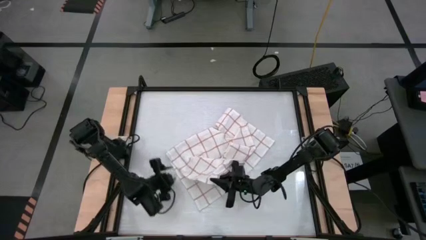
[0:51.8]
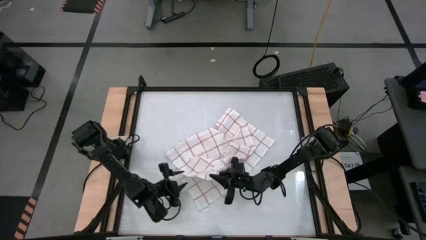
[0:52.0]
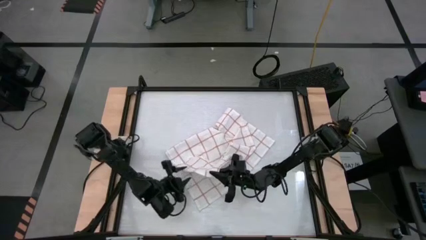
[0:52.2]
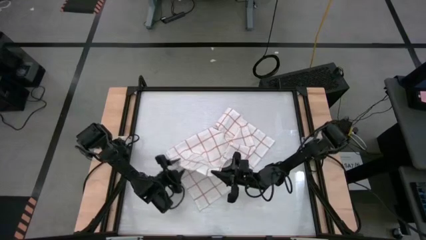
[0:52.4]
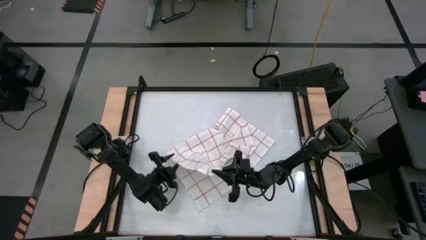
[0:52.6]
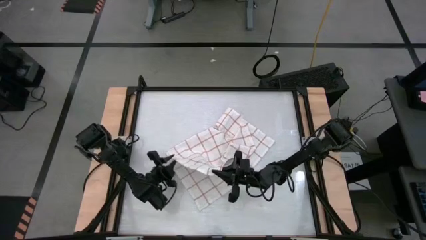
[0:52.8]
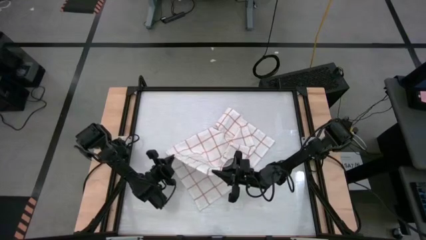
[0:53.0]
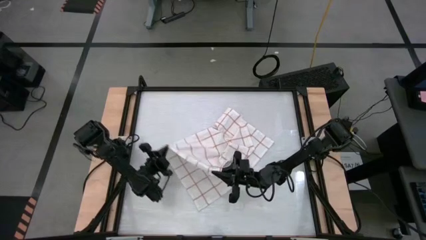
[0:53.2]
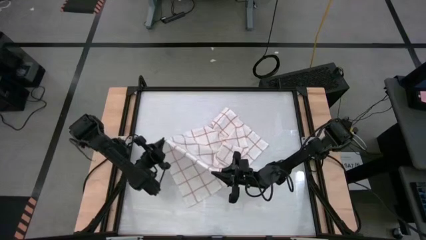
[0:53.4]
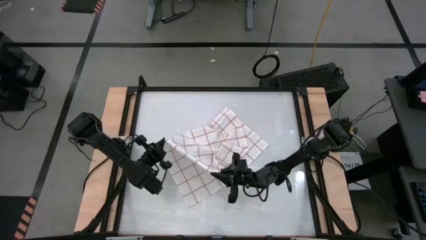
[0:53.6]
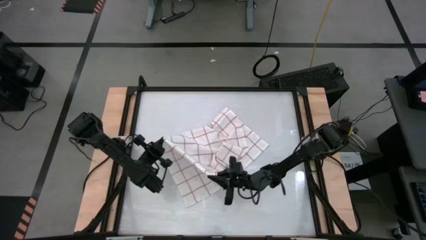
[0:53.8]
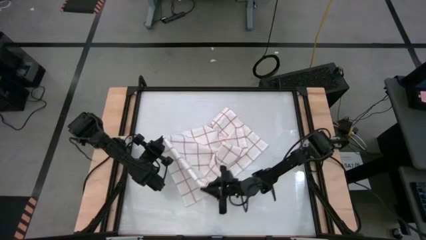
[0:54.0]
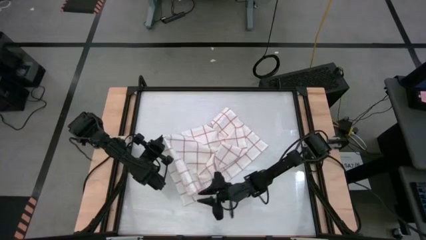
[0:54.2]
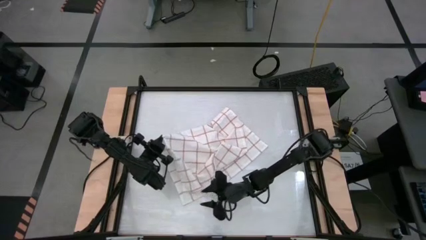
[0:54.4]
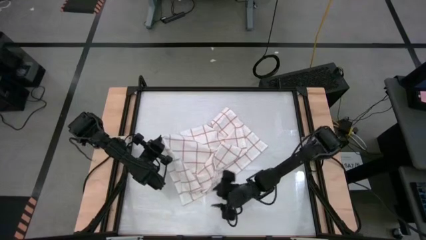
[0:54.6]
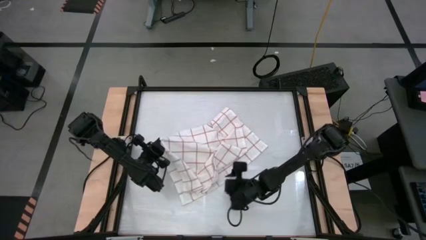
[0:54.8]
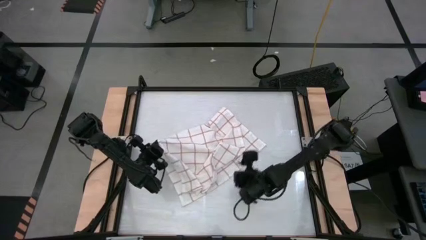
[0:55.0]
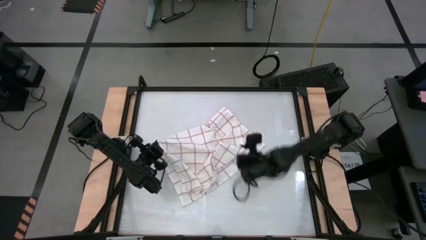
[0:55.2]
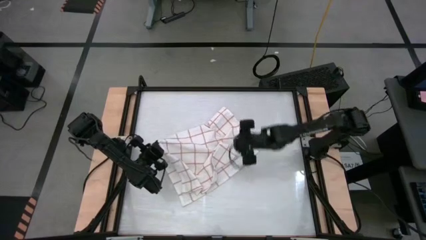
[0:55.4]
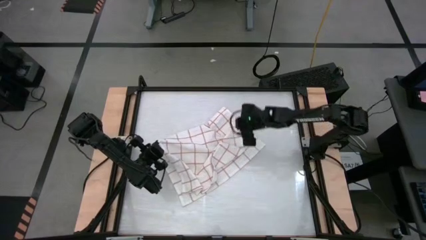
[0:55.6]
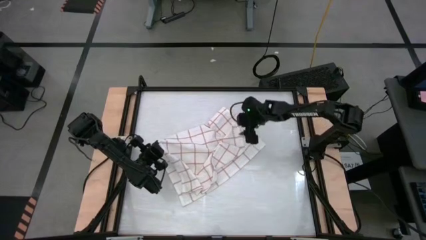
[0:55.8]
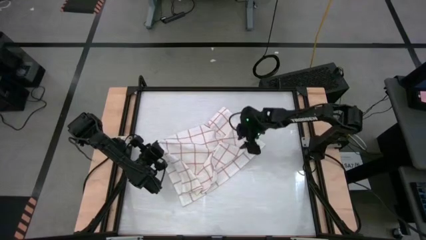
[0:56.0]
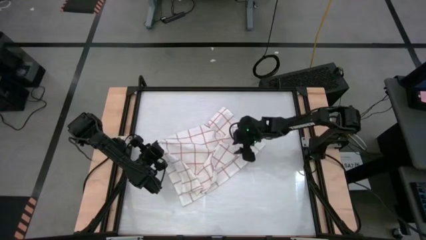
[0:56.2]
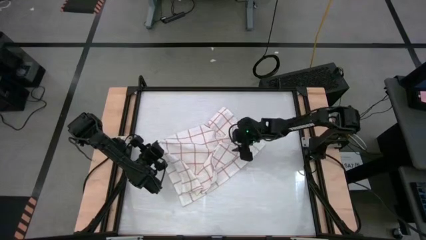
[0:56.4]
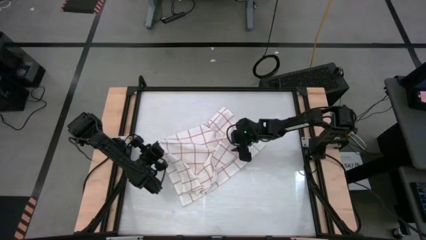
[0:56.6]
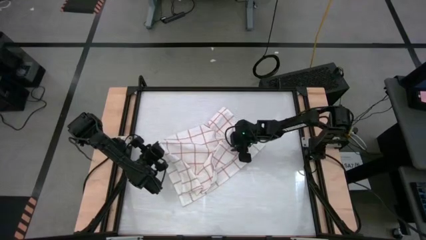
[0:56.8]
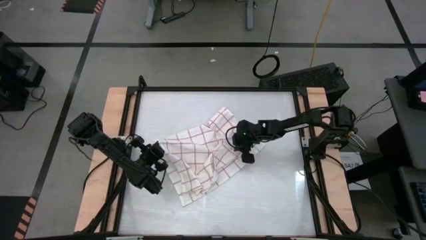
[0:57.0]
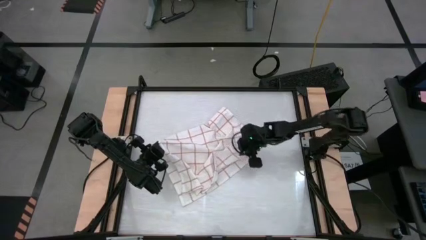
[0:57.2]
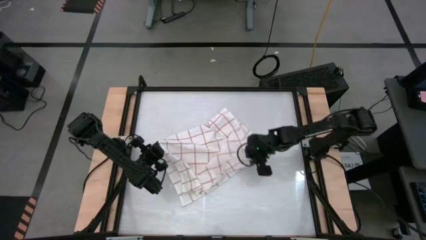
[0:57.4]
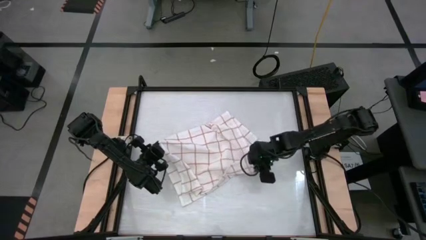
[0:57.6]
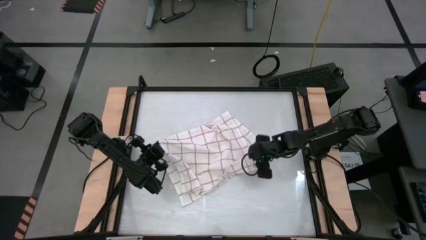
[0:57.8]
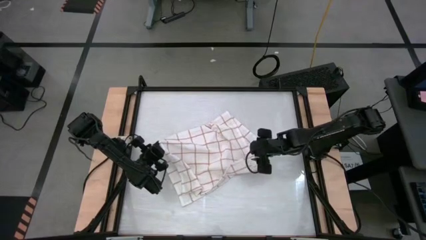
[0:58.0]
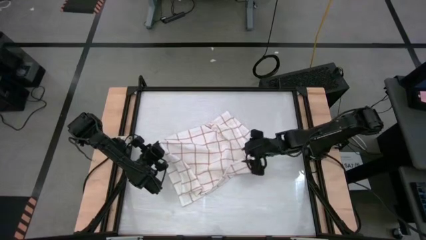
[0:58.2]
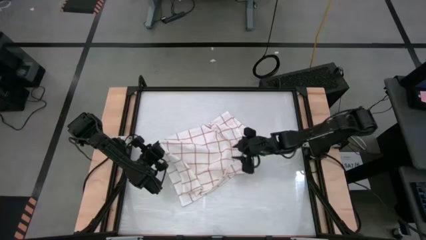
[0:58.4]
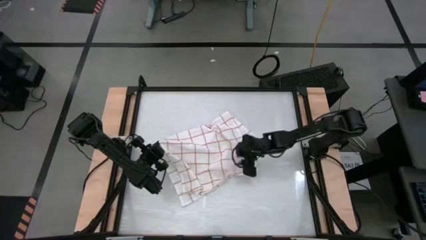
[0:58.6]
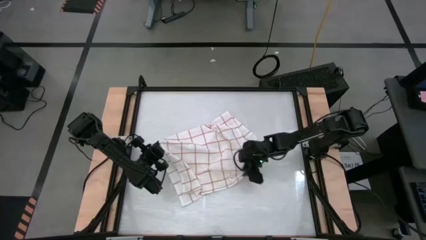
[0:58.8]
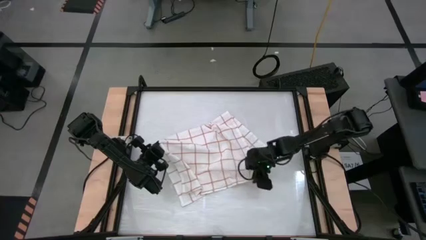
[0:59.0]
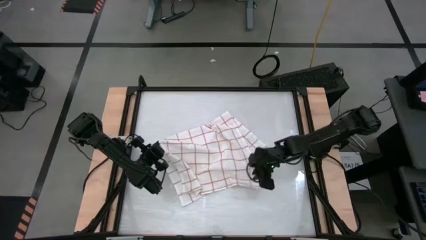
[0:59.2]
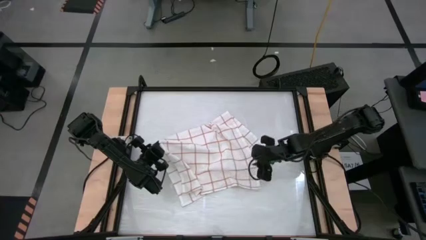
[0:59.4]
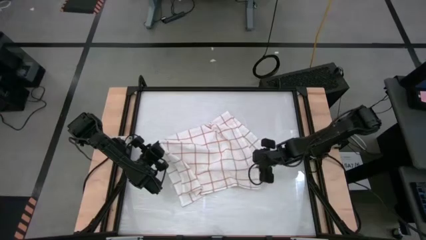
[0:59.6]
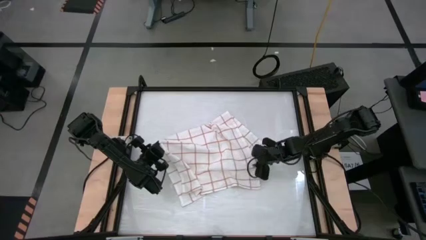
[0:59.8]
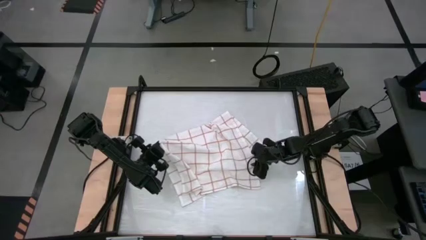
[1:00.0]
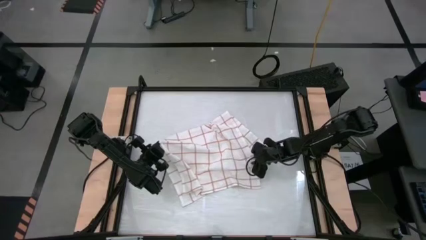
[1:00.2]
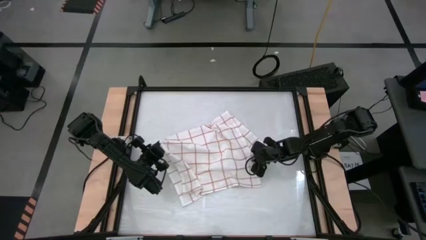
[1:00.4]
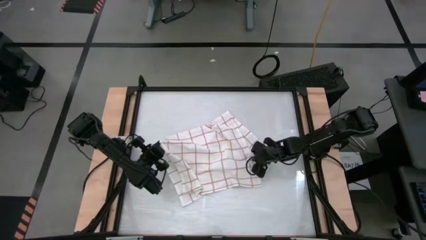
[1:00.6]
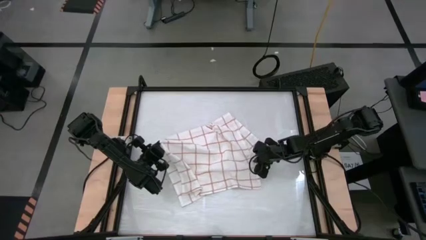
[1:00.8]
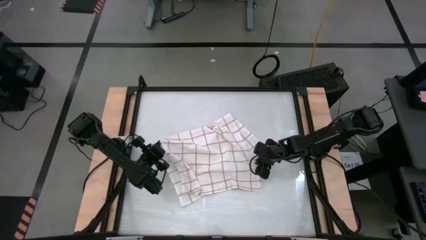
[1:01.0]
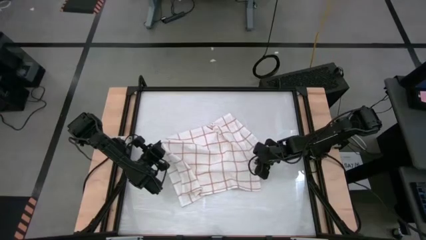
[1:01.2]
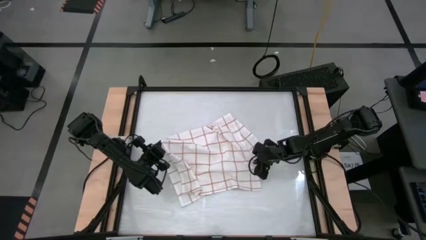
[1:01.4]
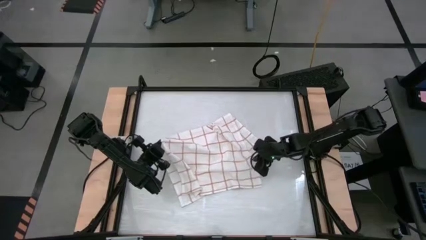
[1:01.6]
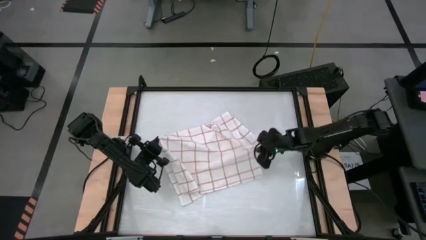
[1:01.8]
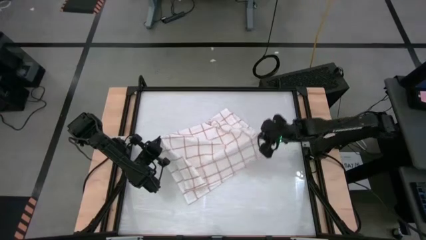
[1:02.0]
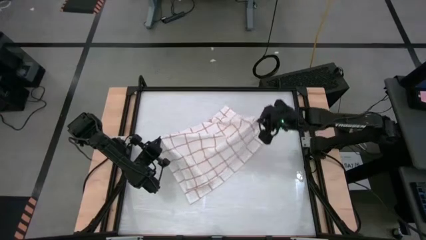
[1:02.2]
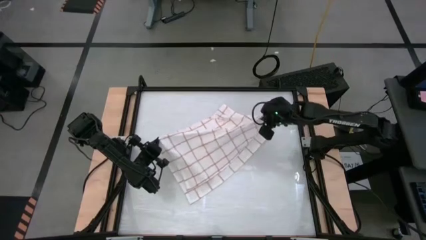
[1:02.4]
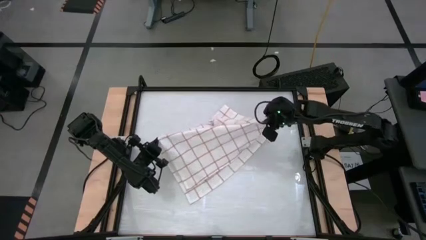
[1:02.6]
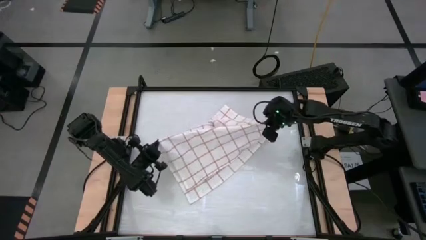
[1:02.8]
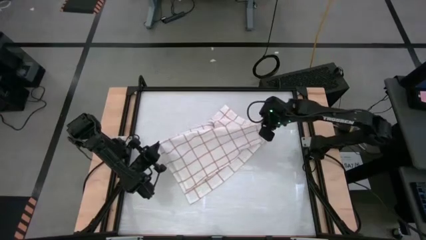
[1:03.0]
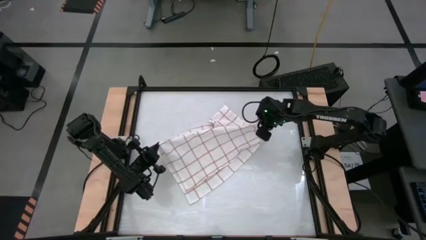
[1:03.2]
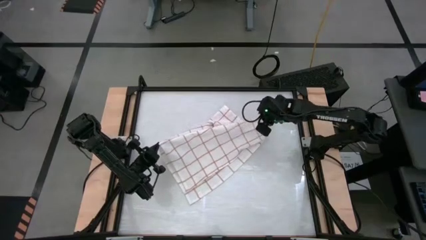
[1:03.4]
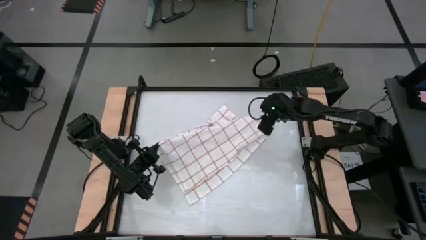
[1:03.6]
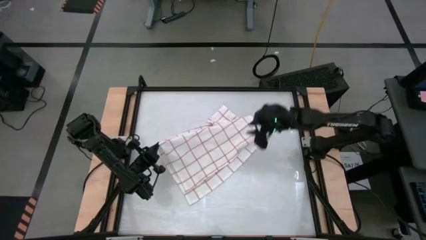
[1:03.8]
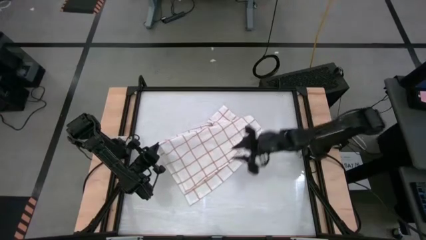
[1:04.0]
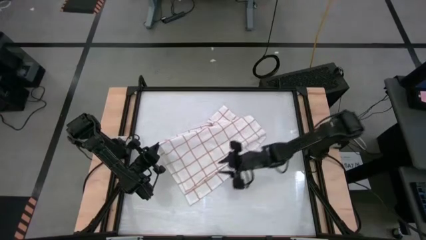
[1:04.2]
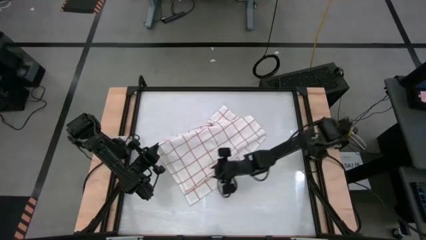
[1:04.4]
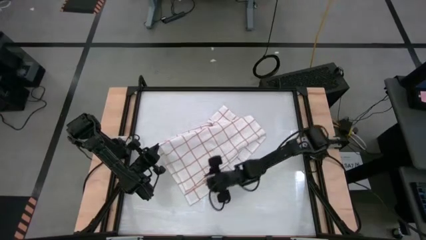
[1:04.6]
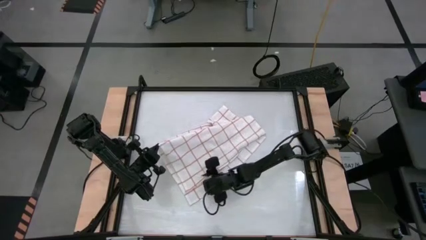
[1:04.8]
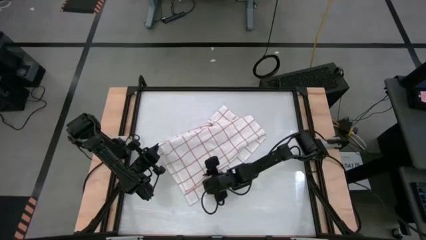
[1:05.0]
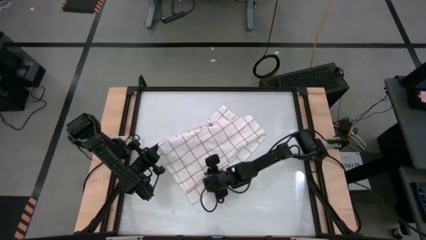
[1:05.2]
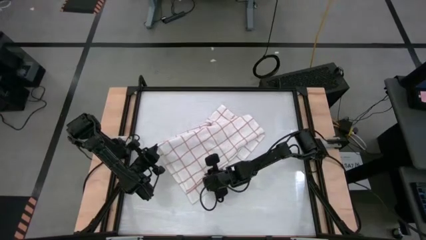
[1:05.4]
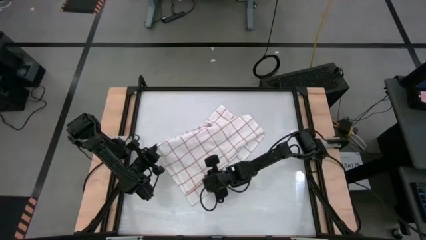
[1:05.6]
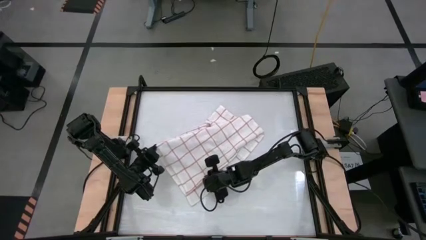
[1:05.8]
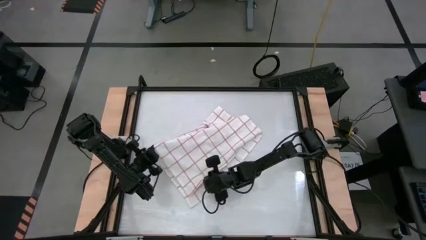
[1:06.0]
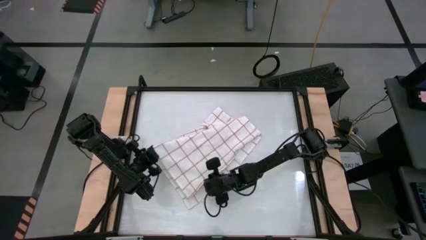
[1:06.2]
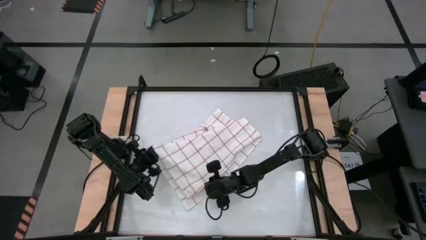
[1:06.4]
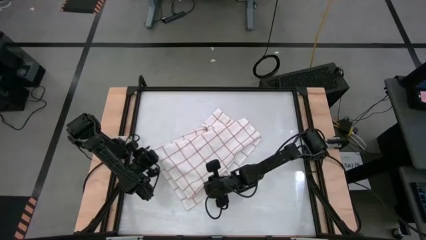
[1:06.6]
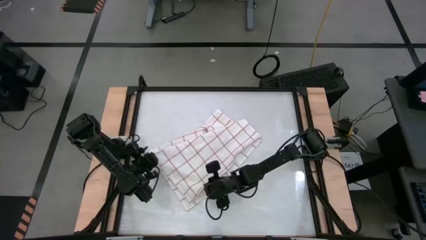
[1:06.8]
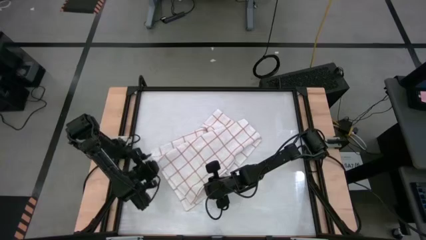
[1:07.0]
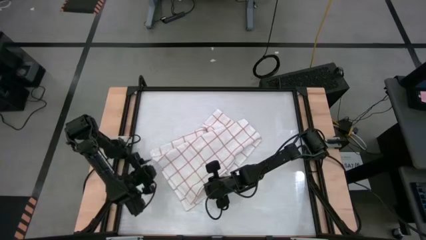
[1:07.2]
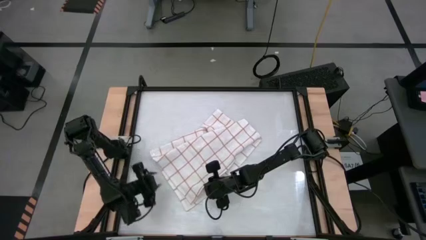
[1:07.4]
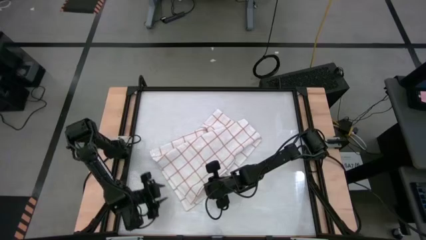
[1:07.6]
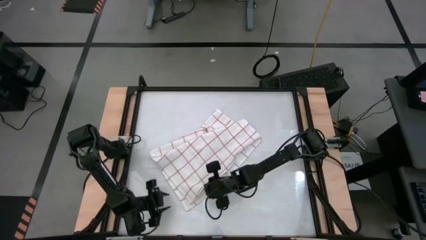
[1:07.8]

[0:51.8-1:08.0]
Task: Roll towel
Fold the white checkered towel
